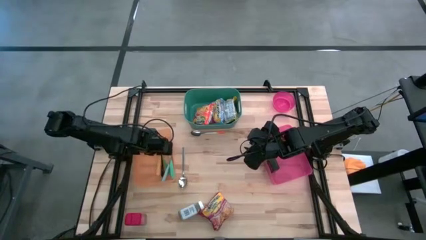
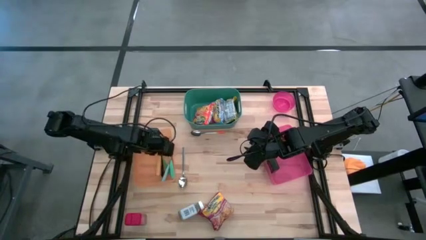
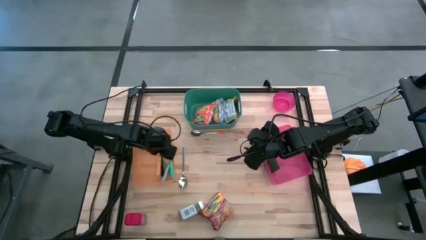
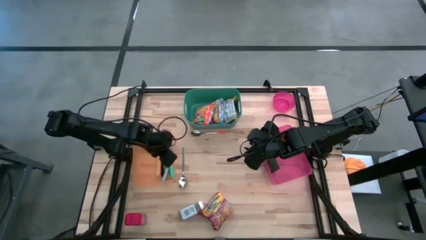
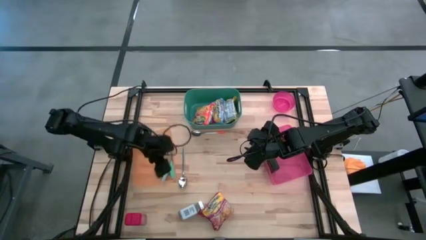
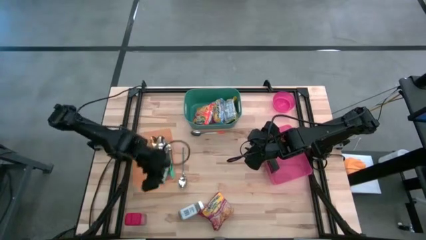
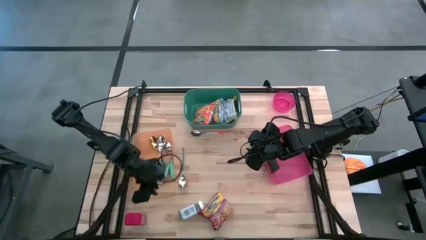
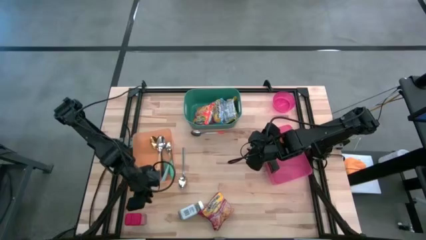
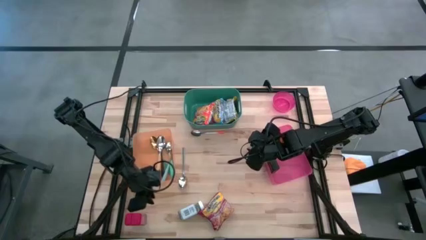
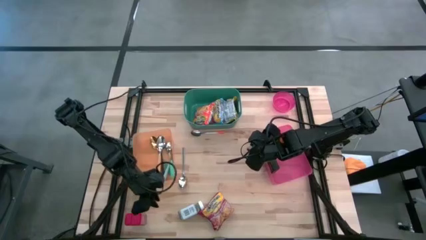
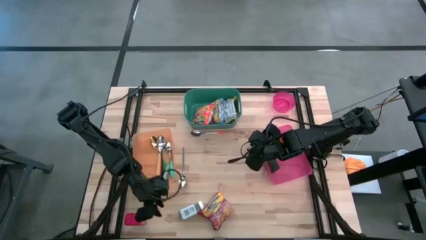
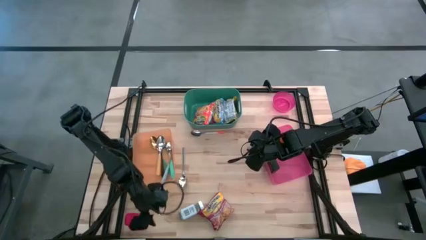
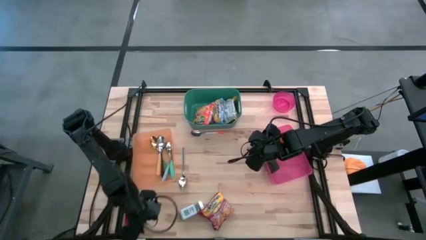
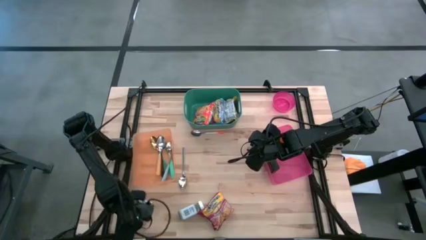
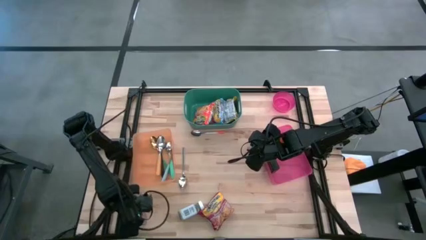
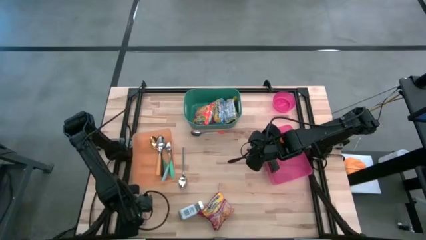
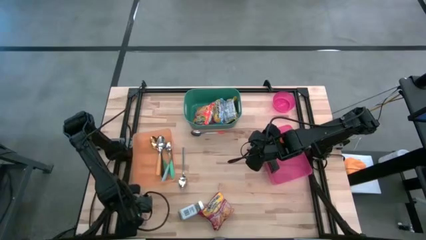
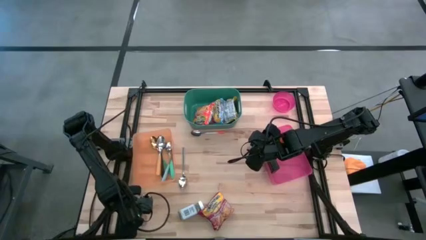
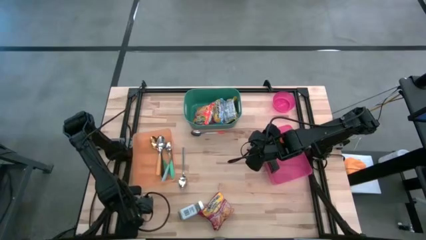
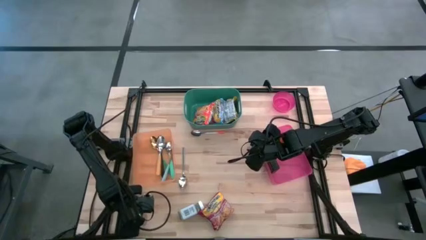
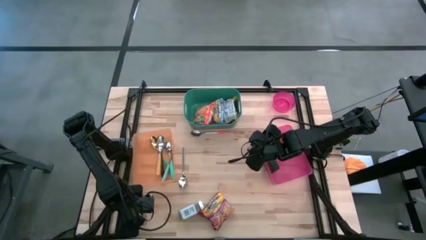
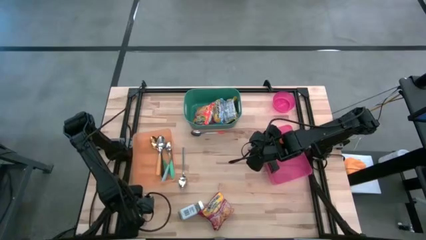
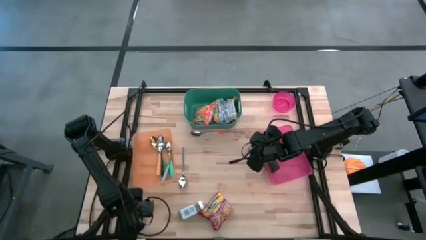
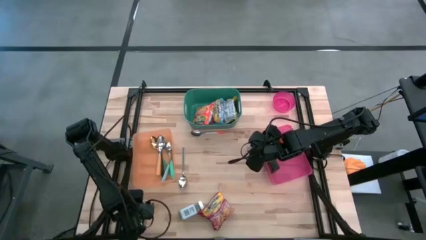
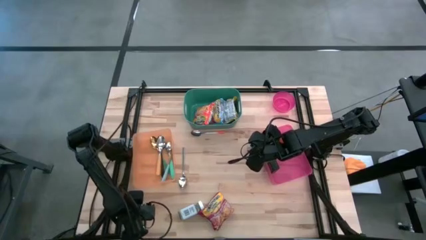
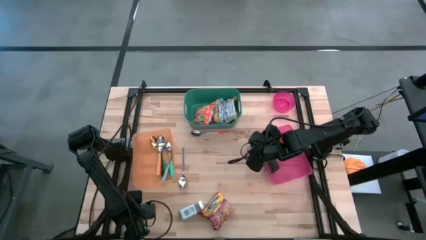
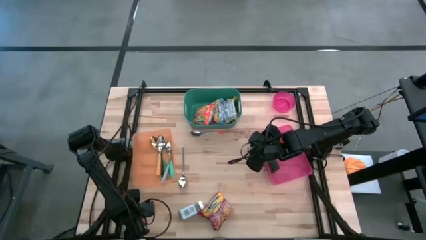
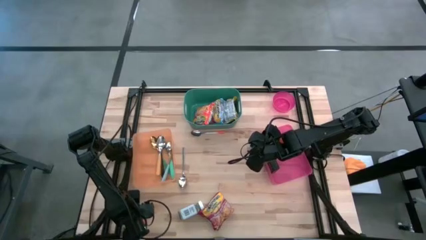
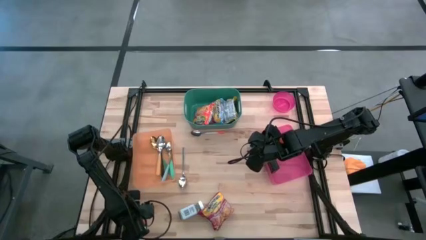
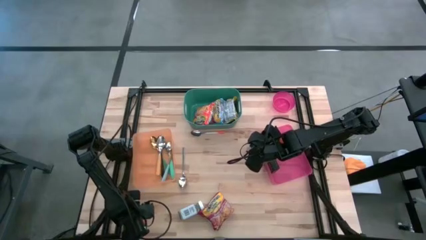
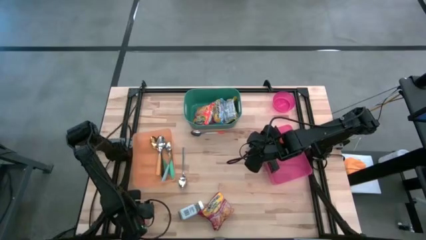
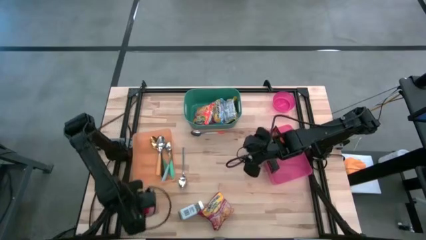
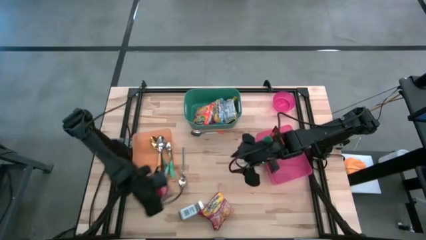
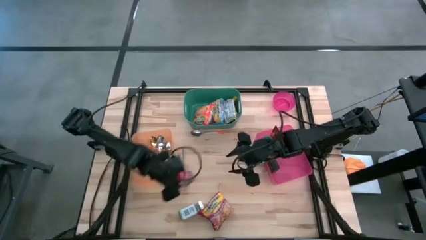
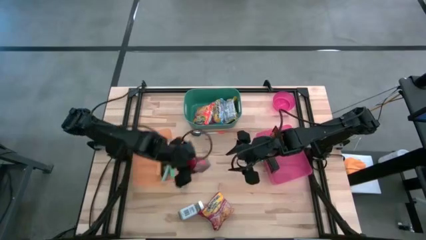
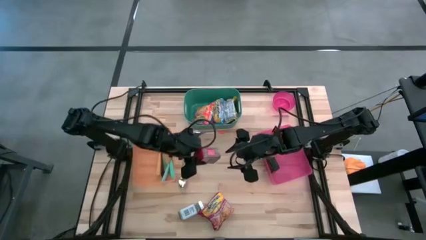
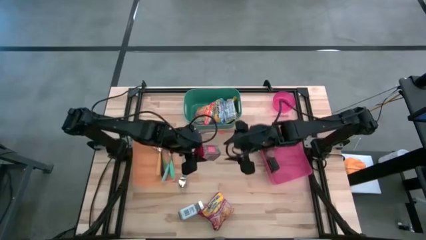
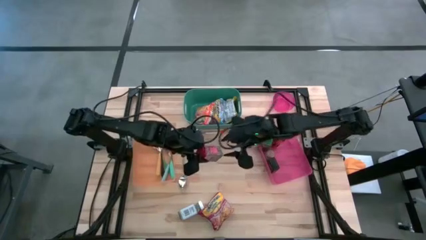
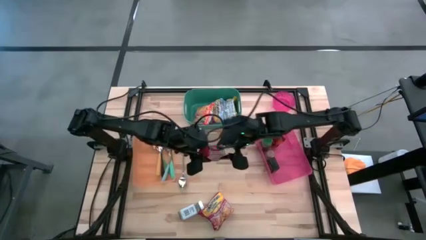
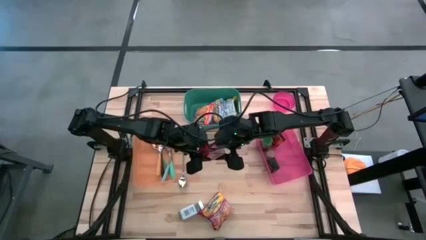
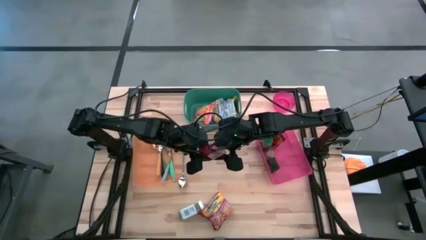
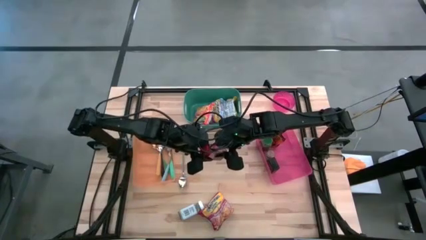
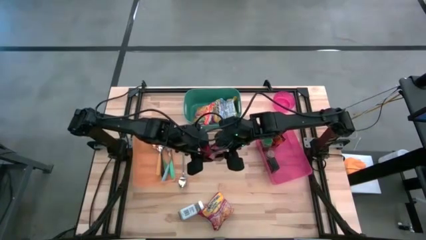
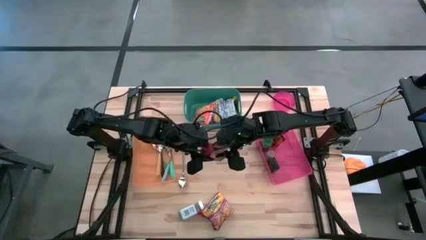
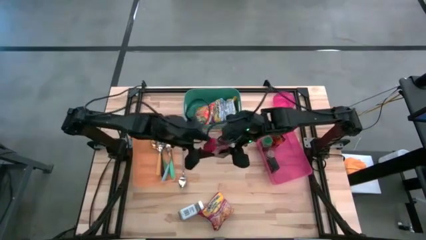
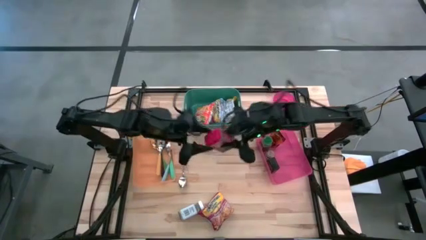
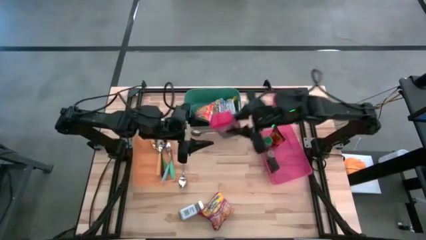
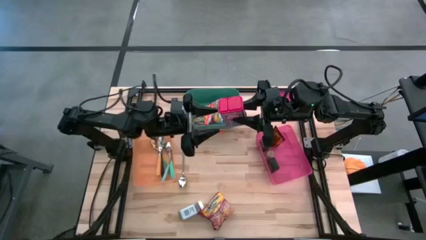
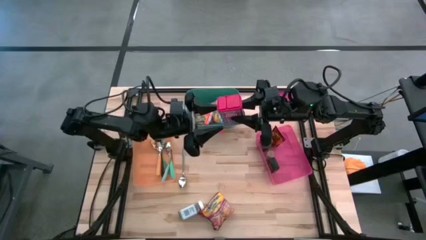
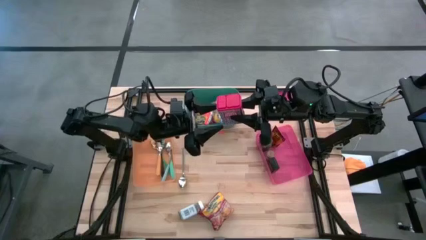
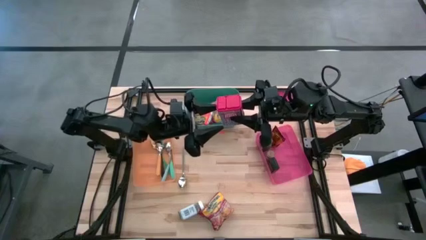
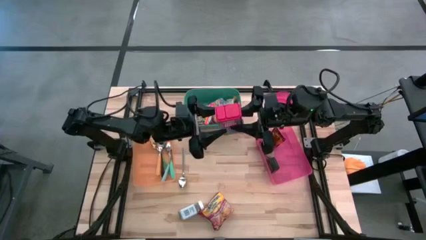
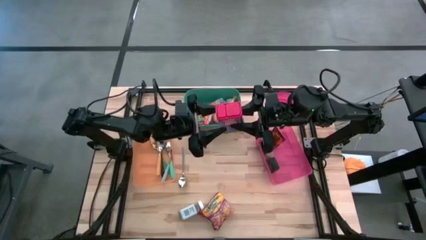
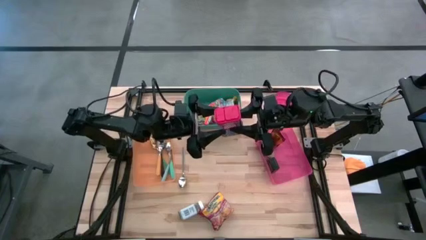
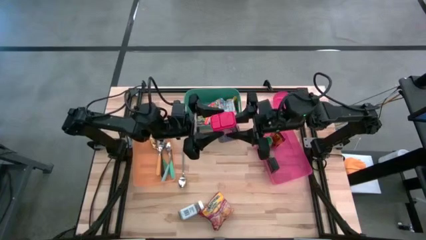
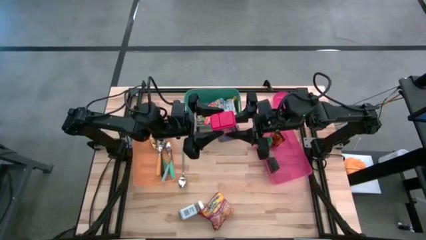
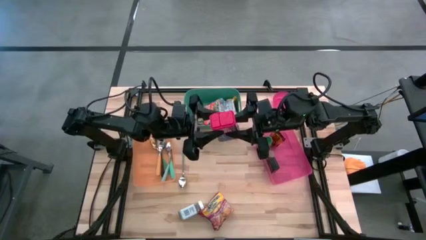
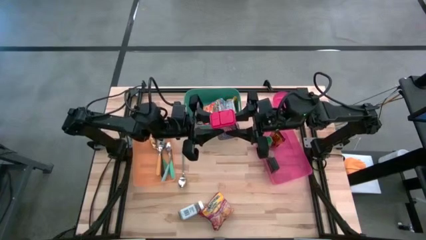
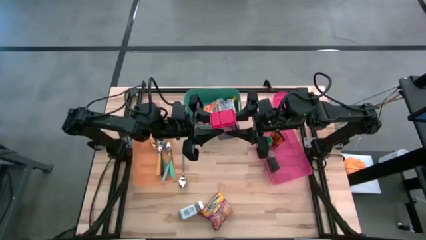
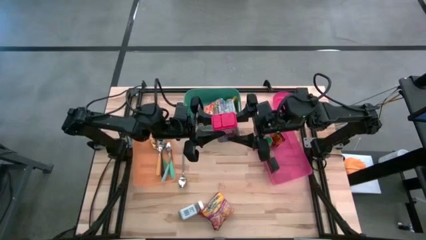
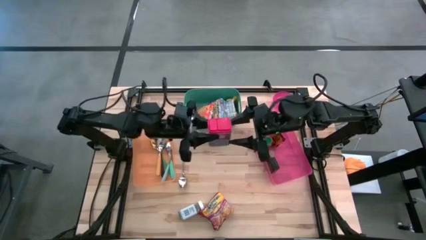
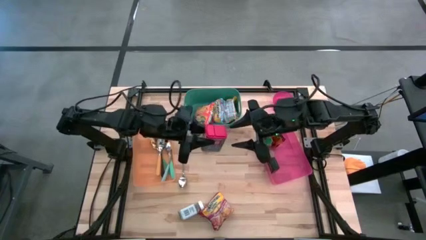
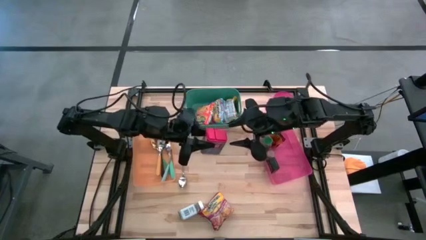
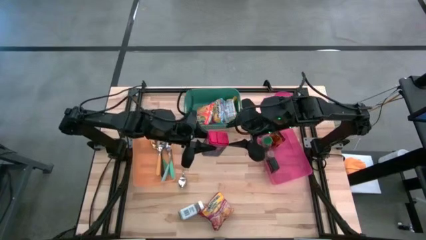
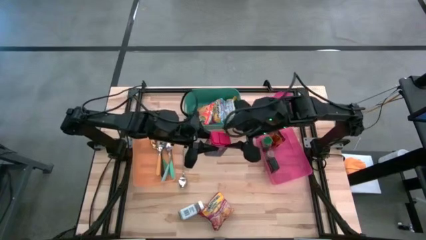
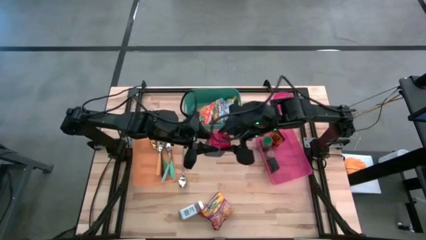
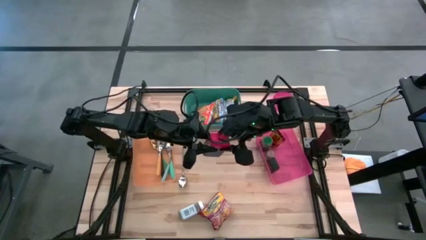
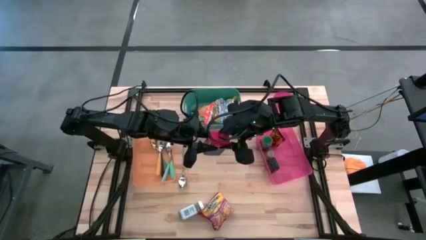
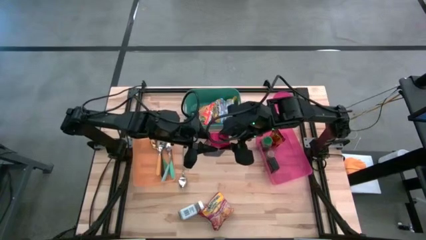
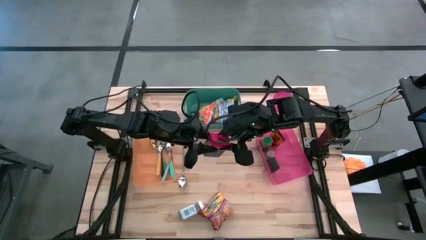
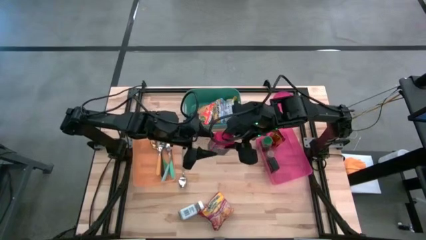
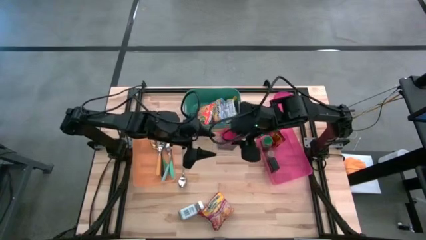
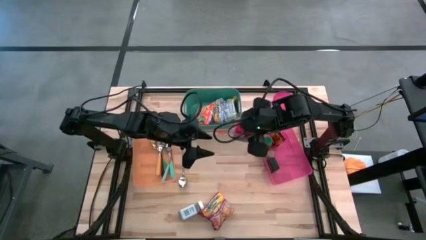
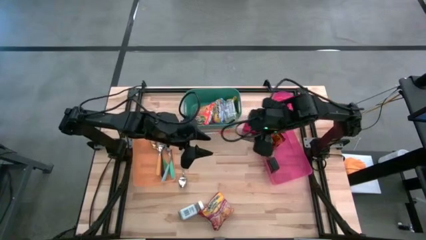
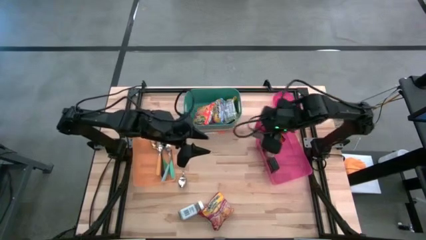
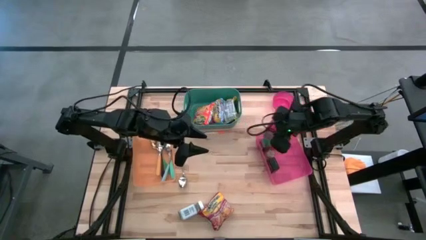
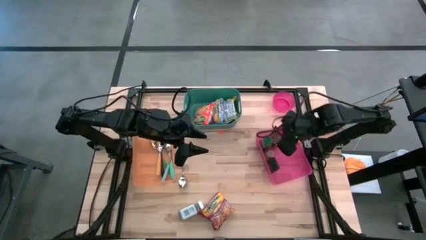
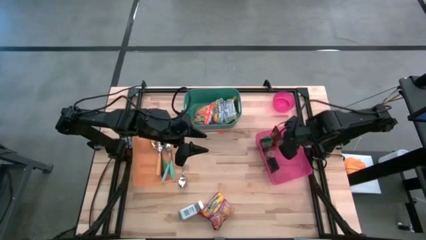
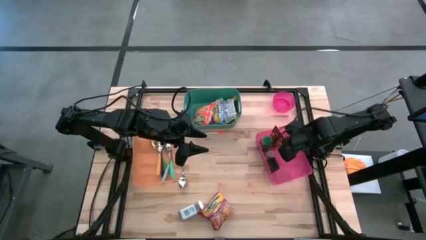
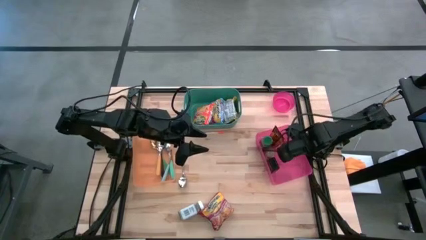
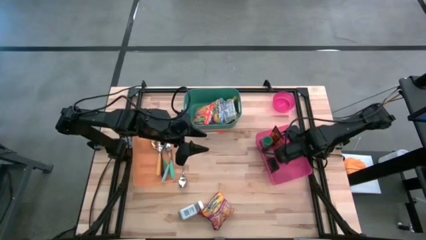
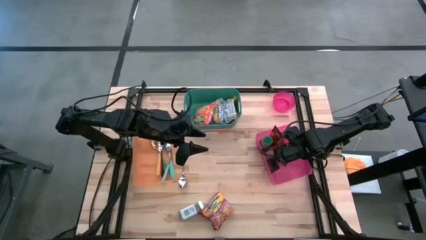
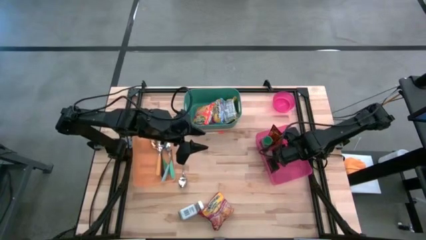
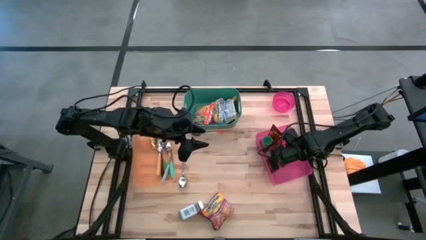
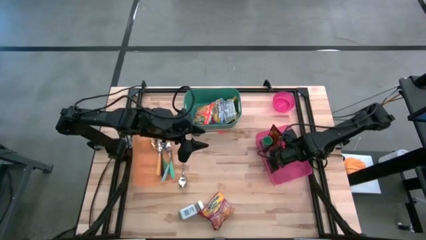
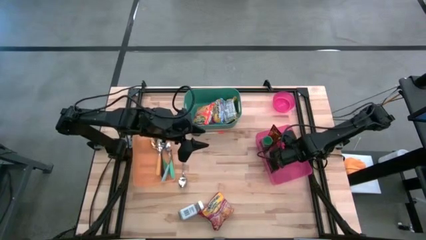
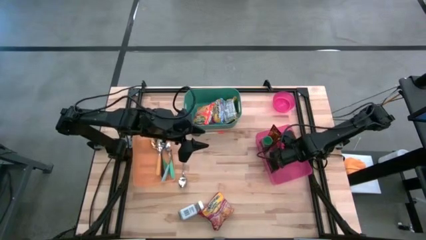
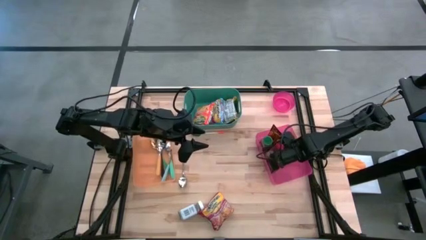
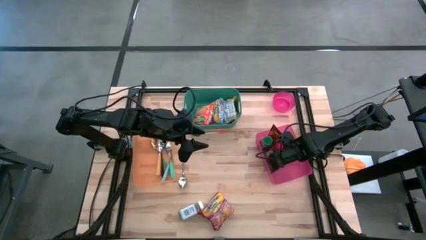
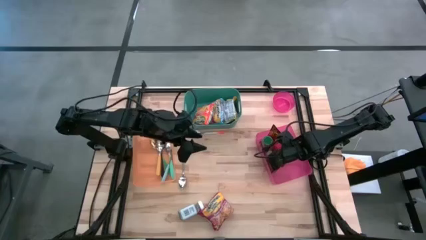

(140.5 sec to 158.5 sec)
Put the red spice can into the pink bin
